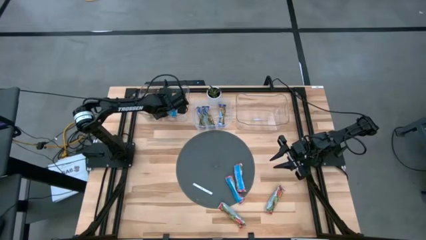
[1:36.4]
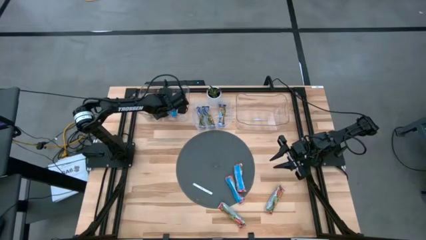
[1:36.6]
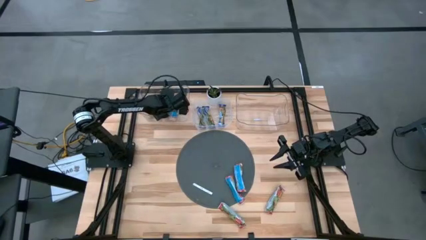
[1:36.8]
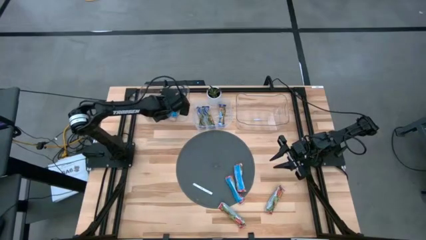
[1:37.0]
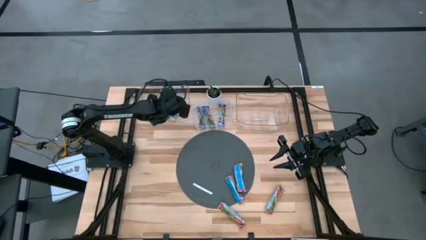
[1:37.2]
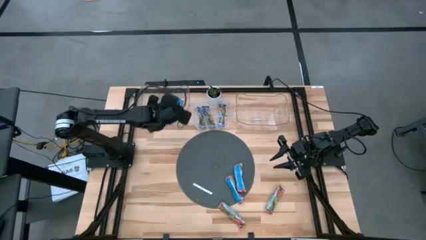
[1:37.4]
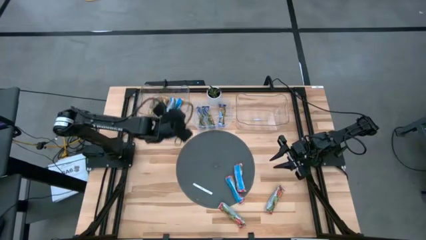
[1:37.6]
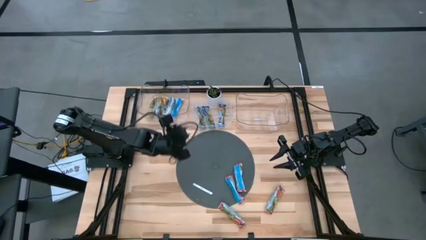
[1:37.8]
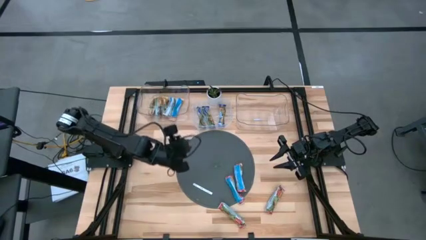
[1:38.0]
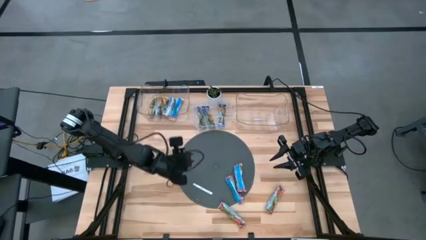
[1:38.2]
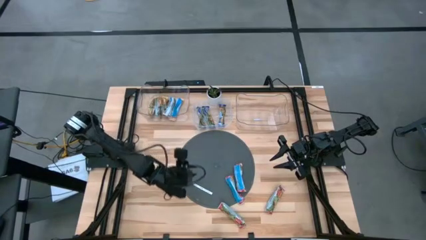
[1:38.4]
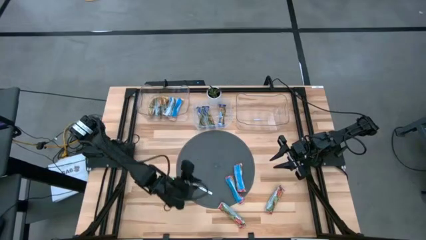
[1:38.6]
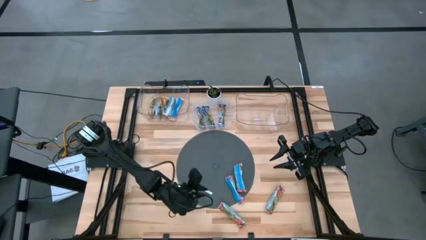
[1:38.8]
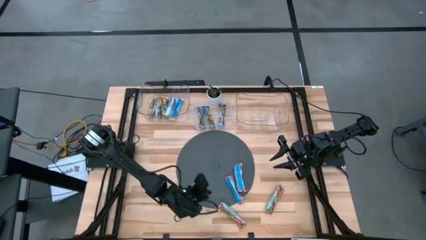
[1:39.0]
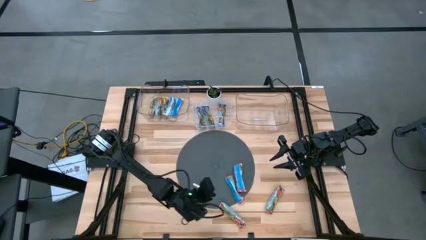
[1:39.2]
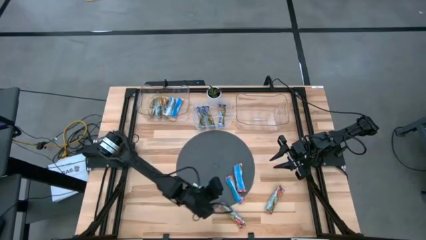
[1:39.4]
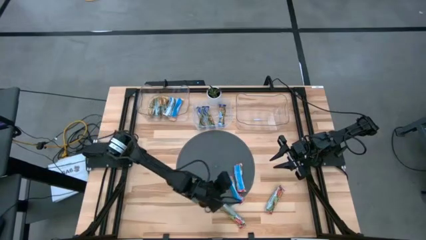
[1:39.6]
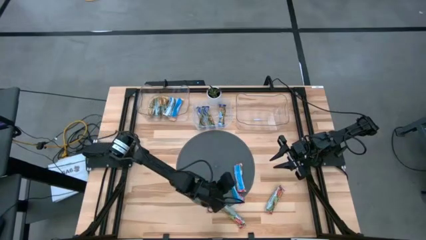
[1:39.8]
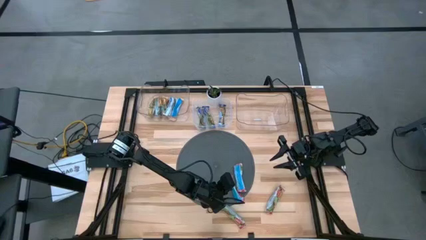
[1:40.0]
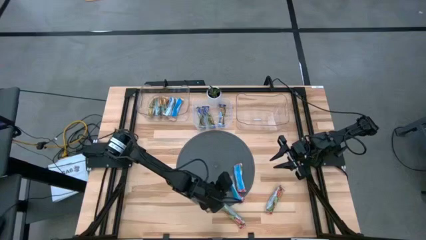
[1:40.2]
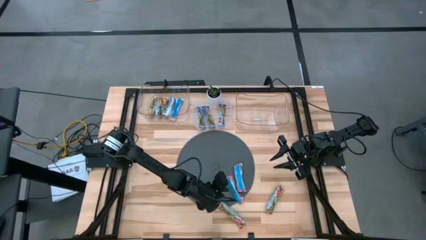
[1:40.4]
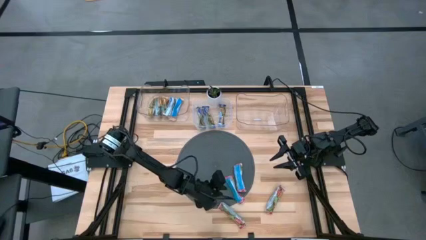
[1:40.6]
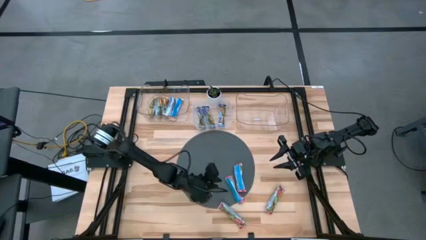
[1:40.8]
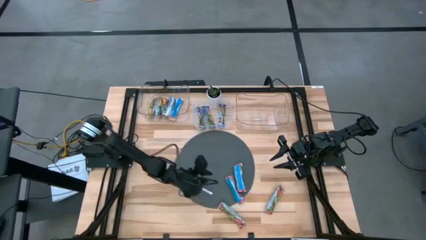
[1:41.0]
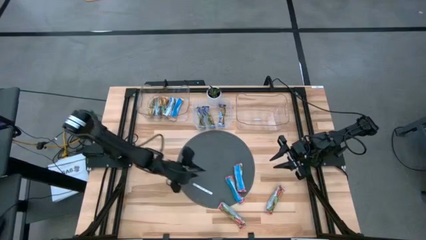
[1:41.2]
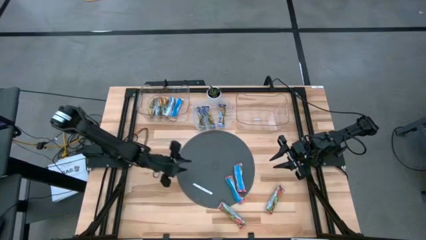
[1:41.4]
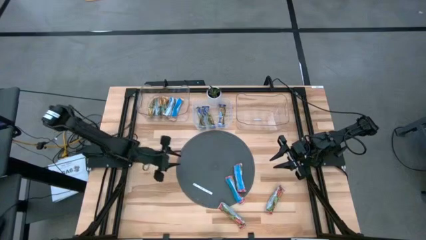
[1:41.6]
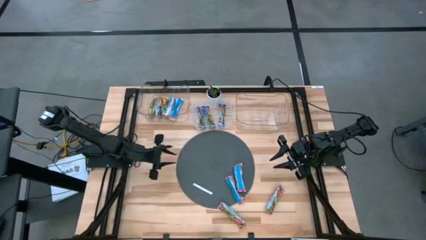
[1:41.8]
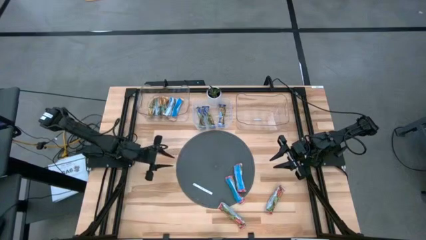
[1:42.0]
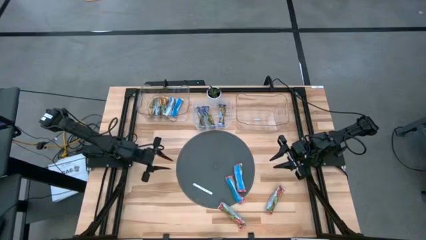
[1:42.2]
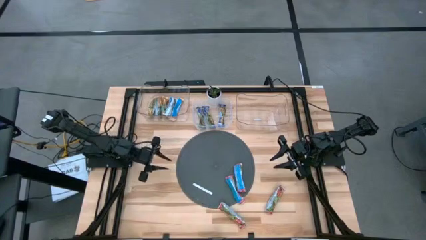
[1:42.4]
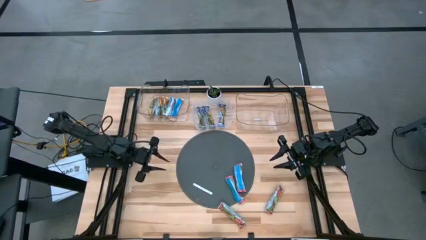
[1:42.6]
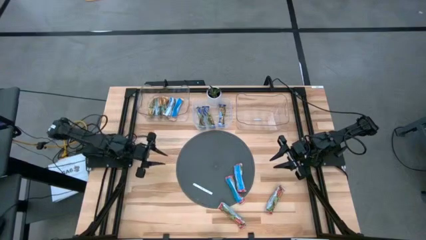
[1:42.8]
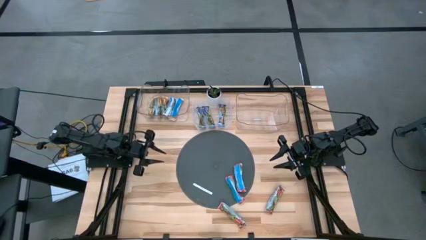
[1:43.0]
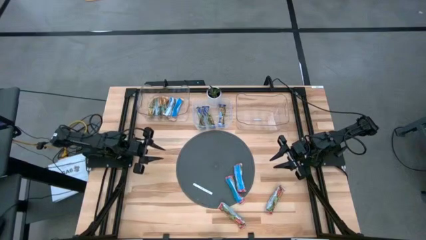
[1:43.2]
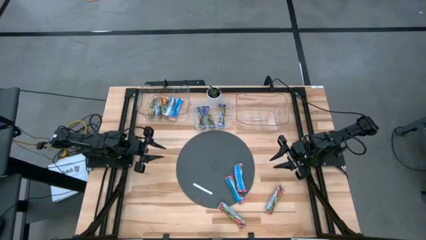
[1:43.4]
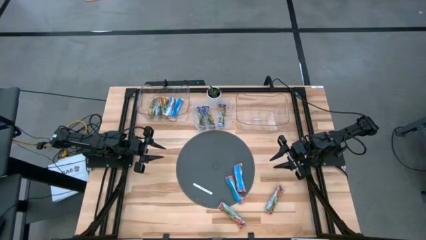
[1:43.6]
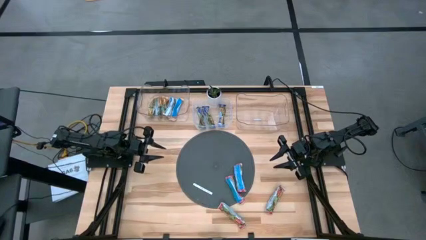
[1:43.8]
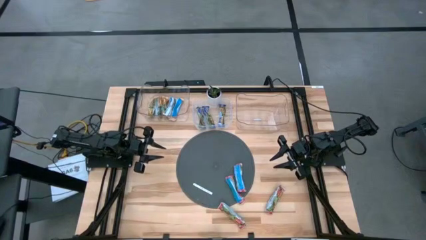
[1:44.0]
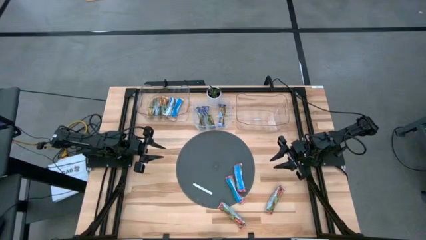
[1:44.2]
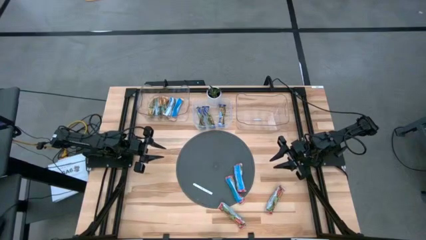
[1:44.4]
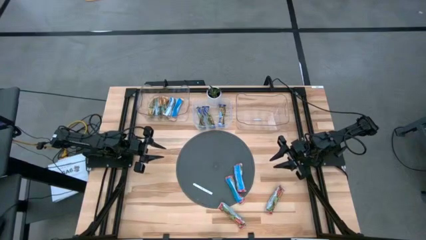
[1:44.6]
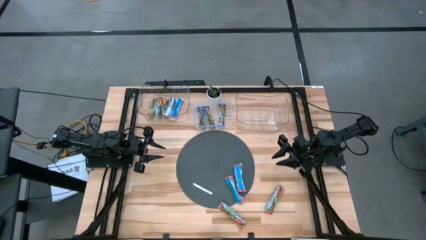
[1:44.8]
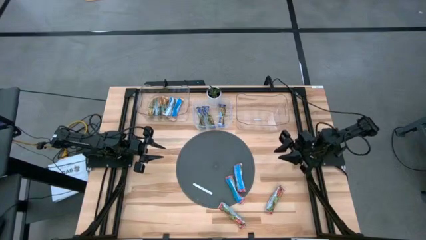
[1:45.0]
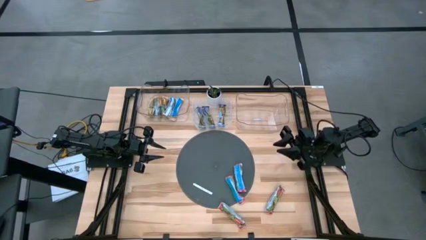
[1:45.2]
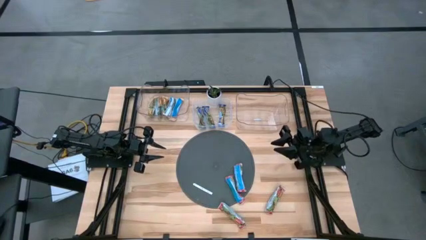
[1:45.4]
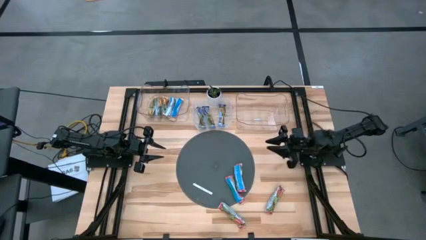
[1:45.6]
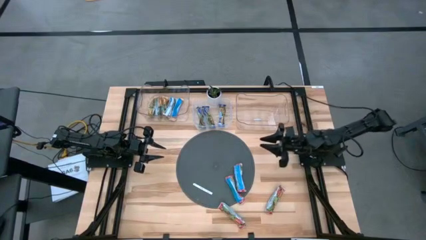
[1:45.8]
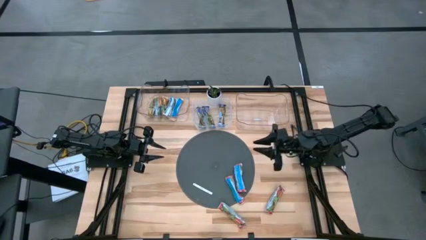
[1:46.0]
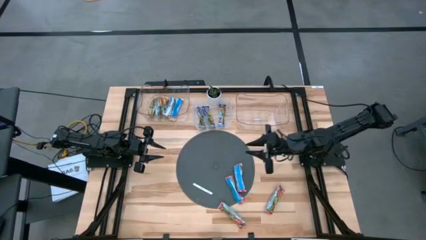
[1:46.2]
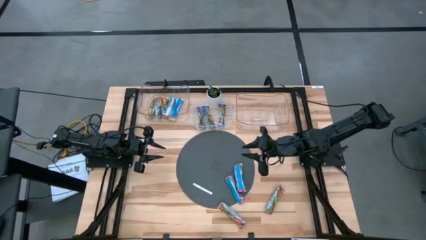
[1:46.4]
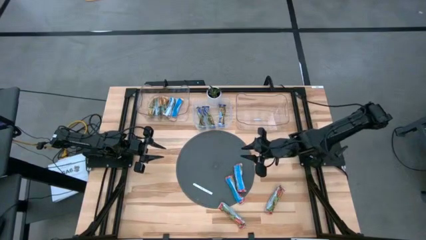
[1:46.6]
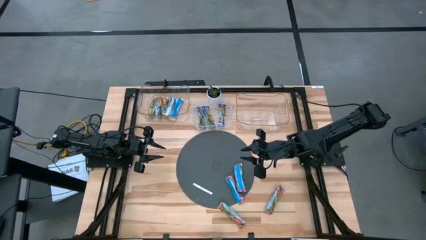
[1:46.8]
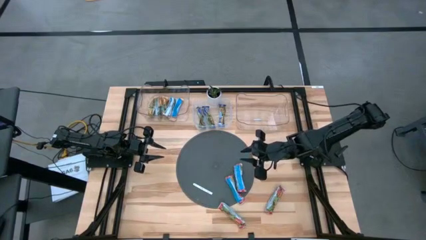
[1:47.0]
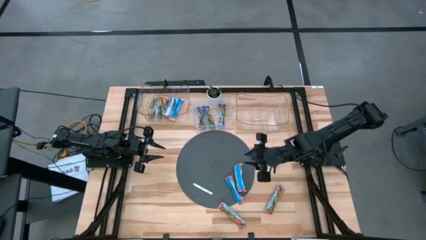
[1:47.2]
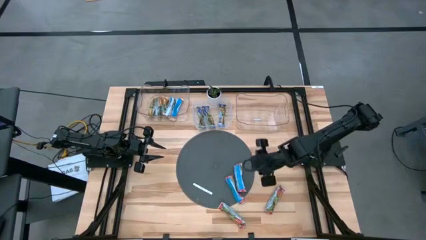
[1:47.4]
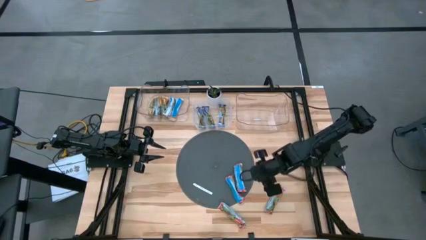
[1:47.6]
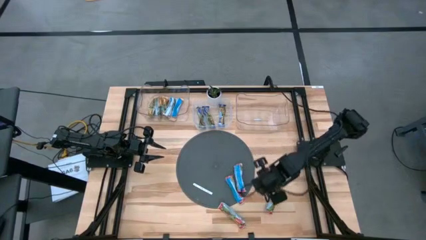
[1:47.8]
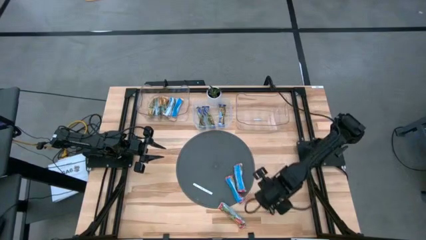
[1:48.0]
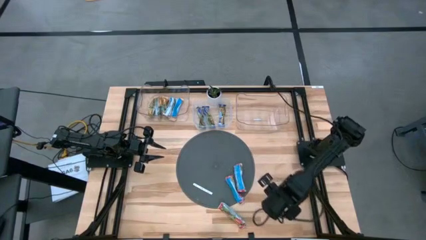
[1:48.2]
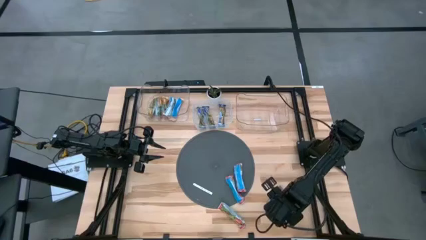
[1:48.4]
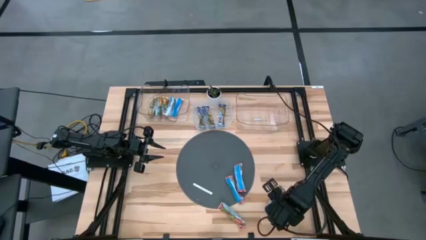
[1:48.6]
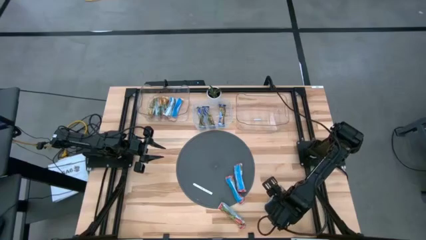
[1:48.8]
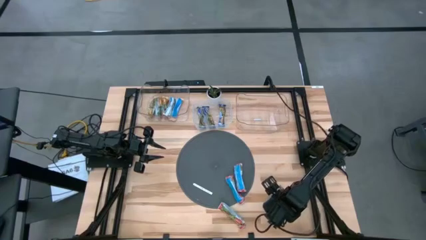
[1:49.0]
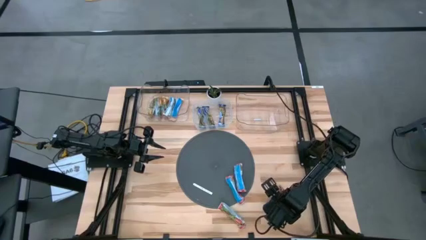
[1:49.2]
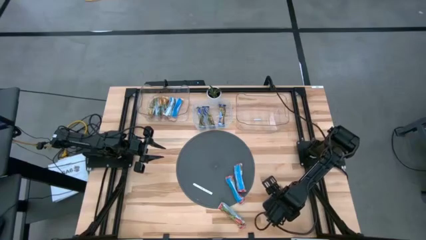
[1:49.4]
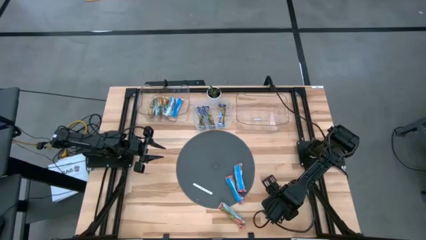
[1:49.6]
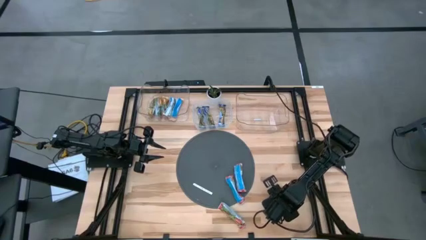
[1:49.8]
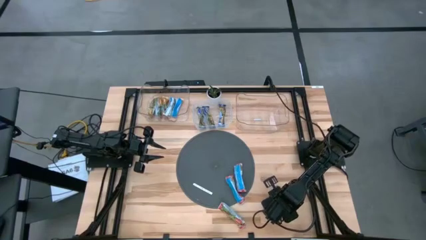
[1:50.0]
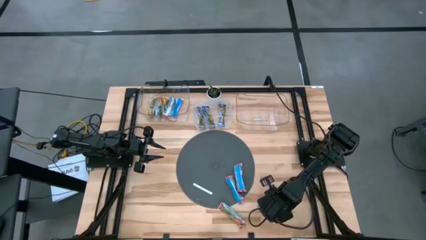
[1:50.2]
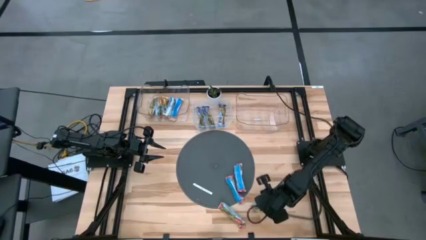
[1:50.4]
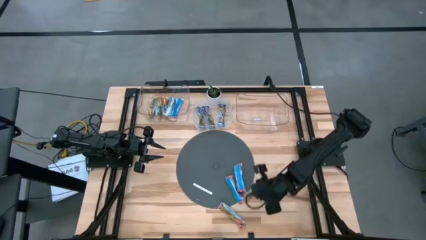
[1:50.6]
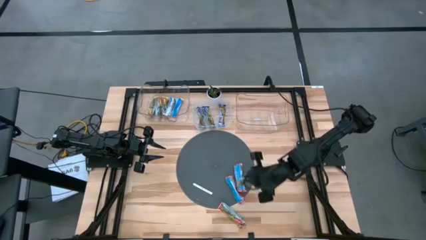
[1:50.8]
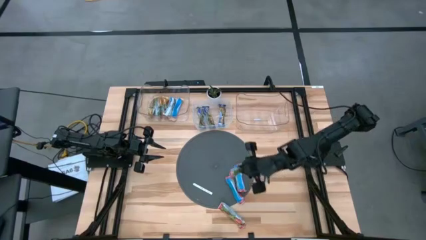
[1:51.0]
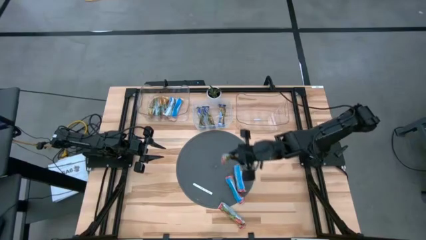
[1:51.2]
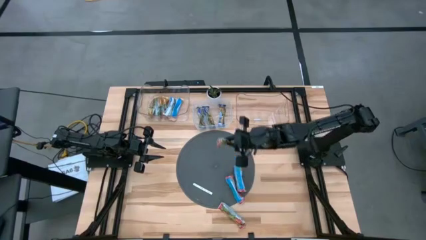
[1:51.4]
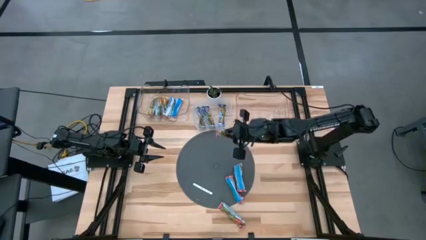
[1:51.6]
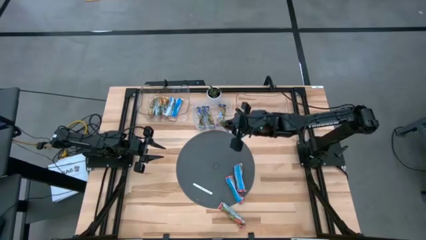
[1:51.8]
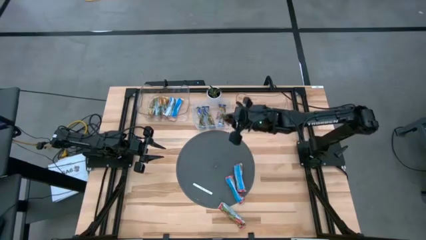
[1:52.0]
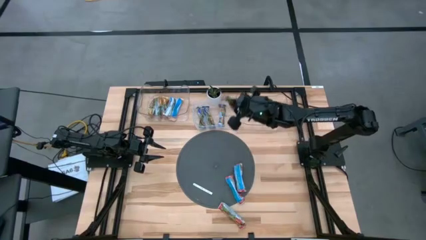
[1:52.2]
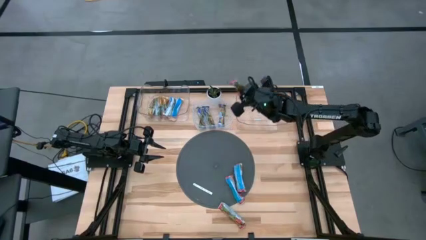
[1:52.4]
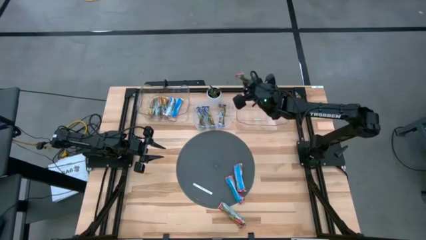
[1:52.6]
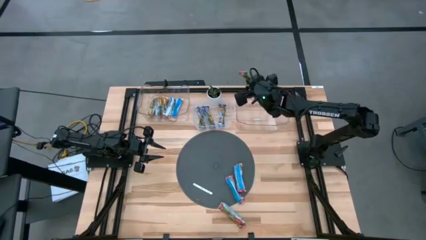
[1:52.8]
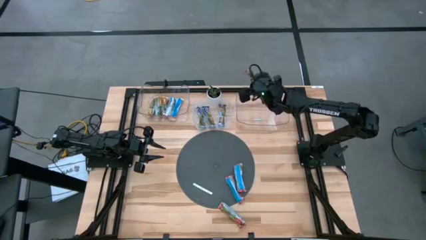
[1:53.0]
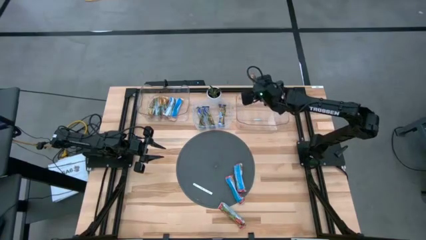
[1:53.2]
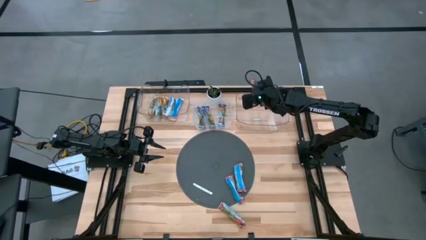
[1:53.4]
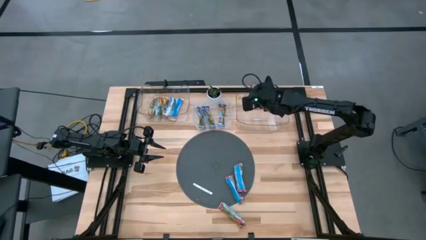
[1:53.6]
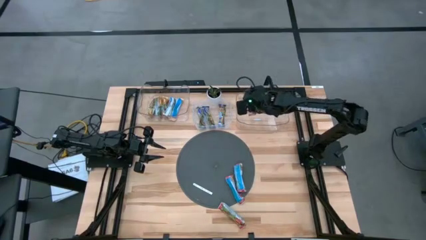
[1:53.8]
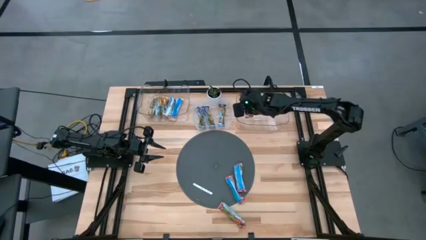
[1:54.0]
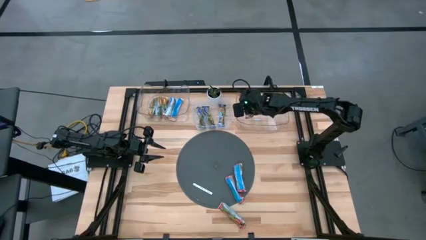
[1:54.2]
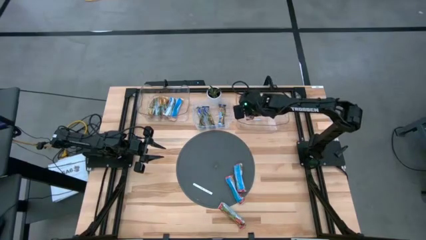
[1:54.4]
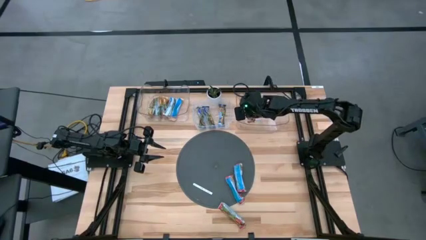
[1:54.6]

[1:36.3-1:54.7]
Task: Pick and place Granola Bars by type
Put the red granola bar into the right transparent bin
